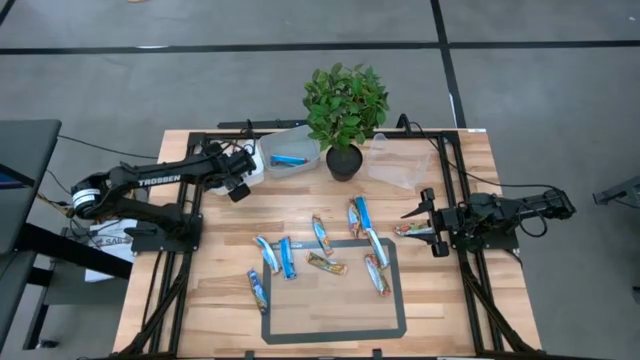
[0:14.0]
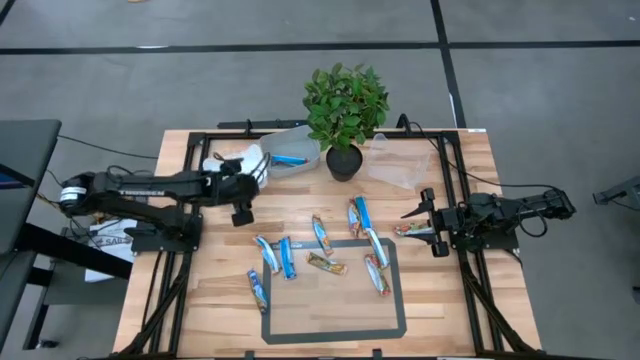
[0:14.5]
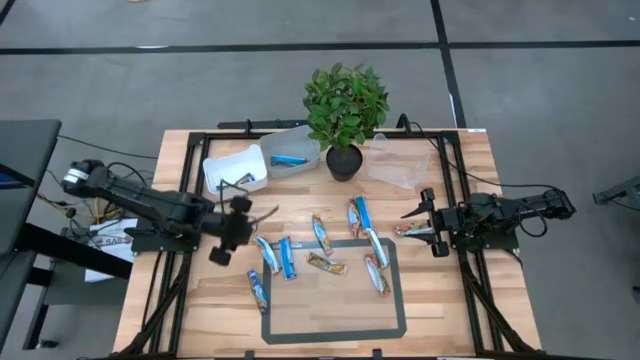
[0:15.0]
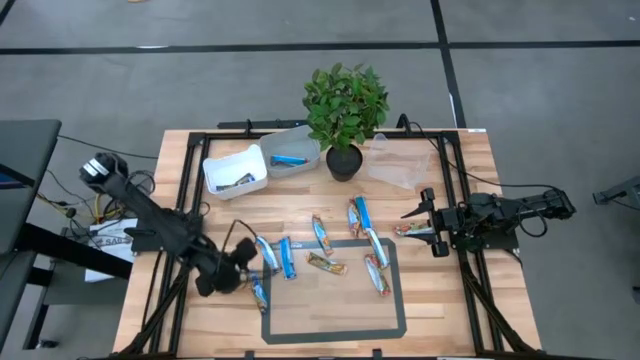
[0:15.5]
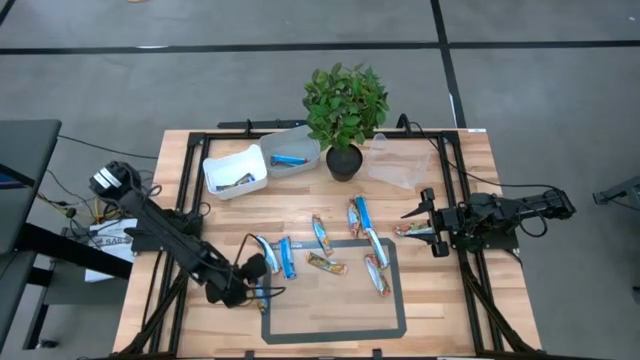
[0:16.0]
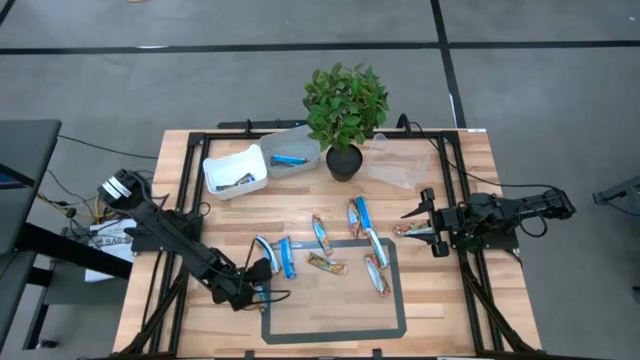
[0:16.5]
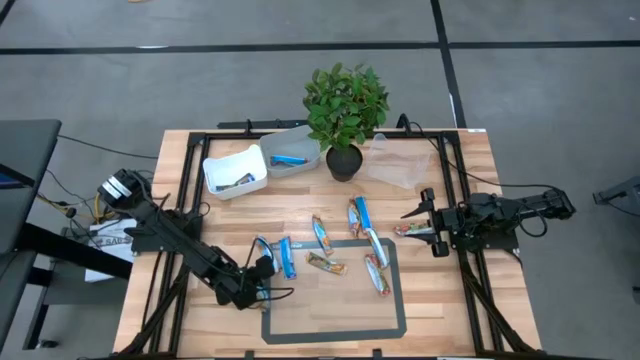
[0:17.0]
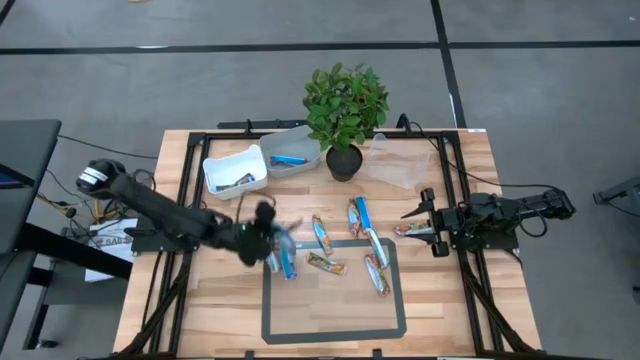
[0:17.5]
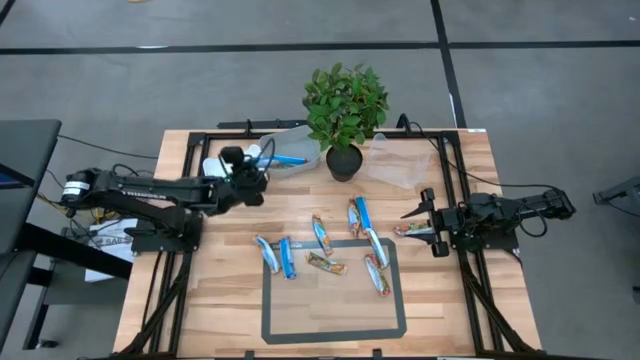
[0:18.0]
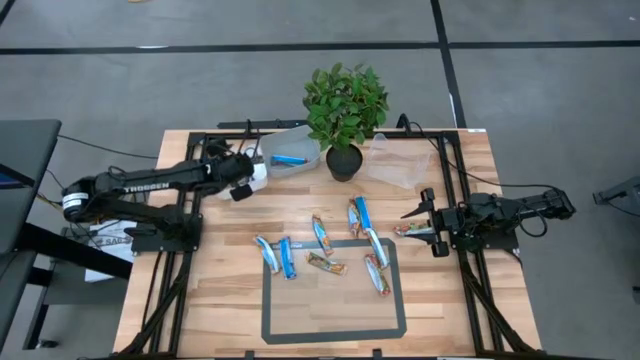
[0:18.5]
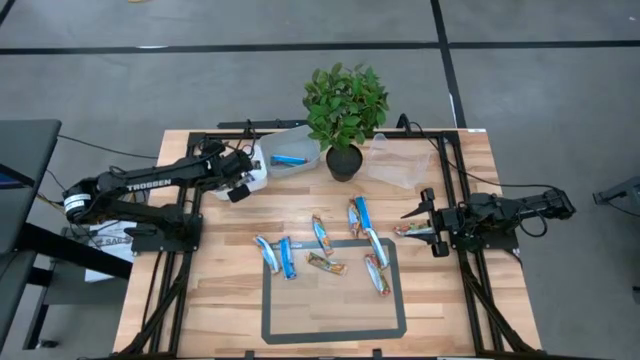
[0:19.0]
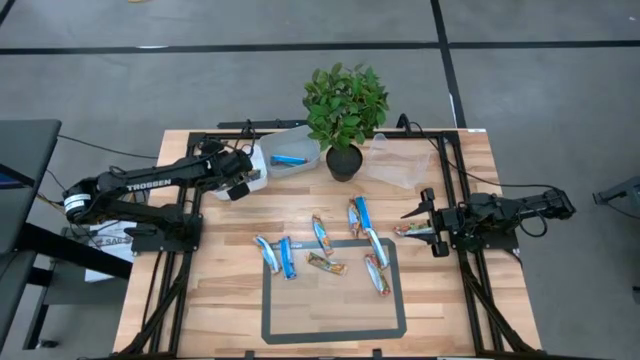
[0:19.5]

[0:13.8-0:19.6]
Task: Pick and place Granola Bars by type
Put the blue granola bar into the white bin

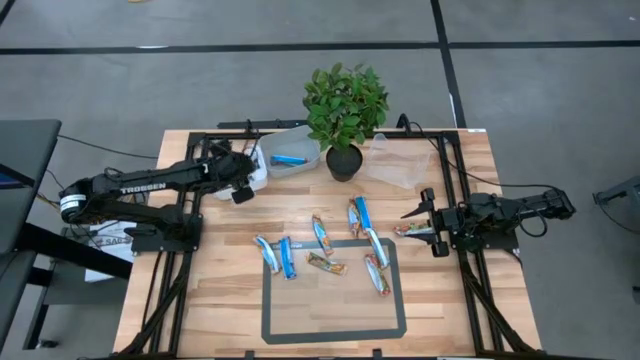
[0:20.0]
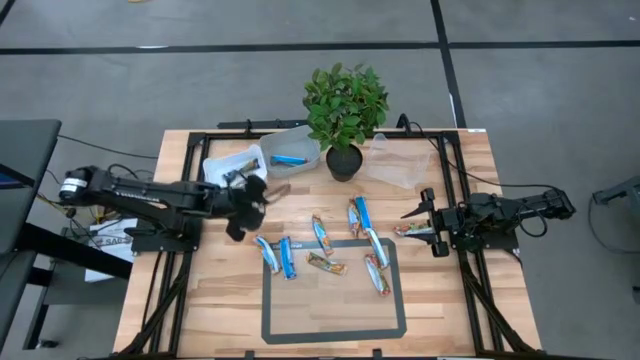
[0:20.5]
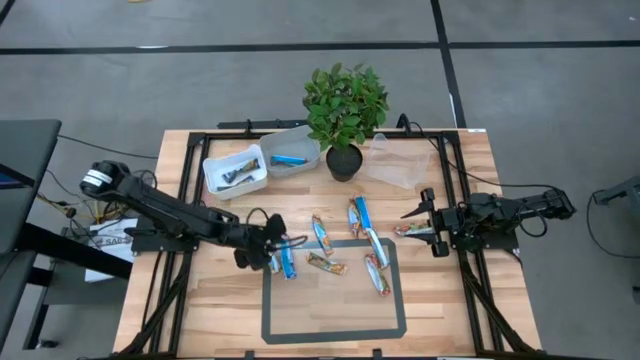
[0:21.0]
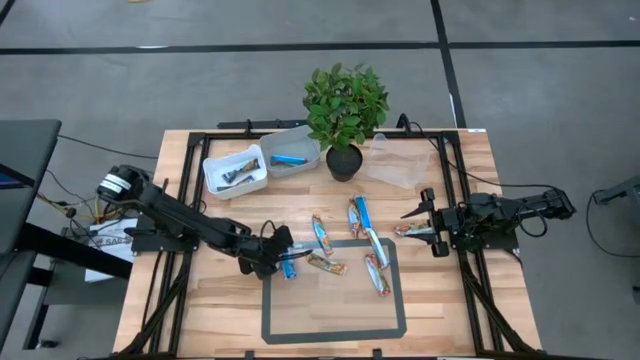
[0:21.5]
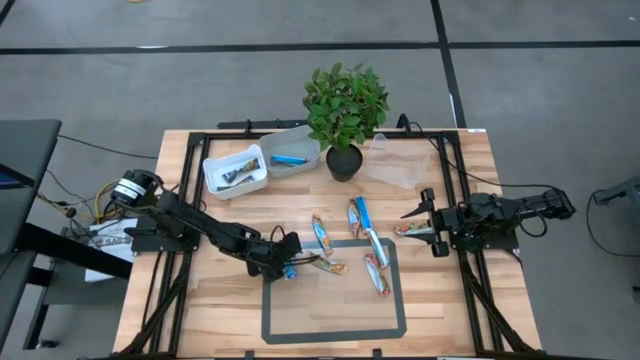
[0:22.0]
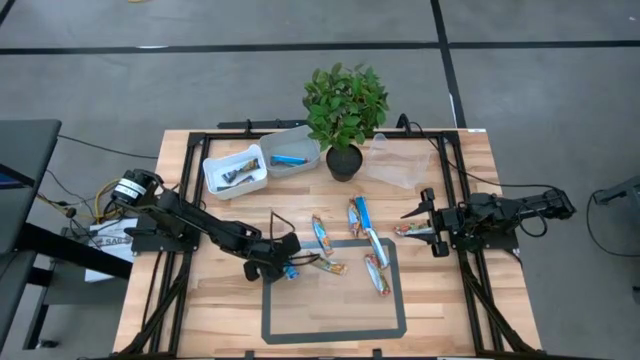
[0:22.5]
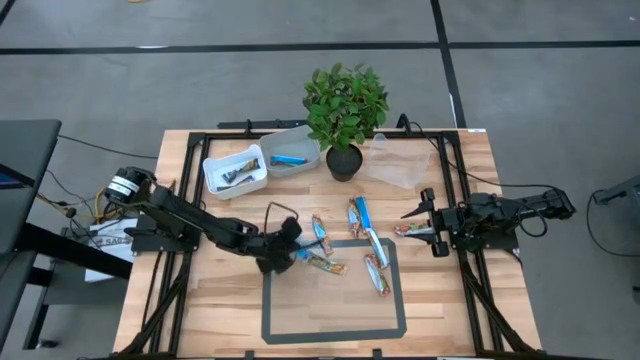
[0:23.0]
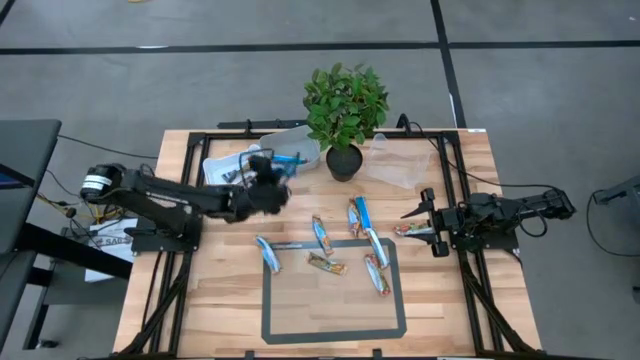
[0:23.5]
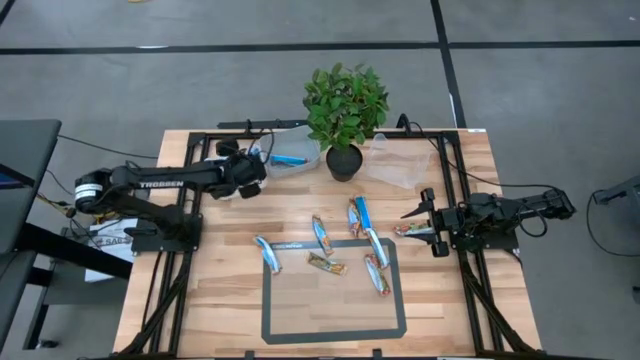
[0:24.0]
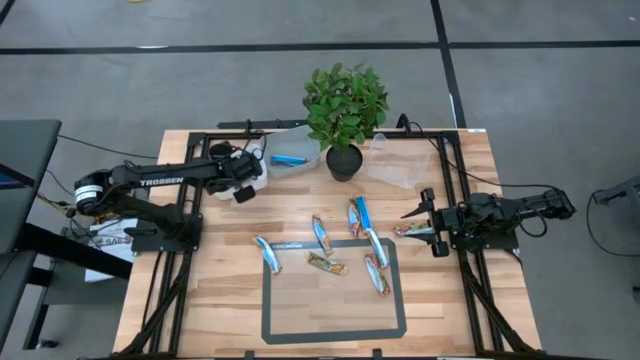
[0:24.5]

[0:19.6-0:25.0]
Put the blue granola bar into the white bin

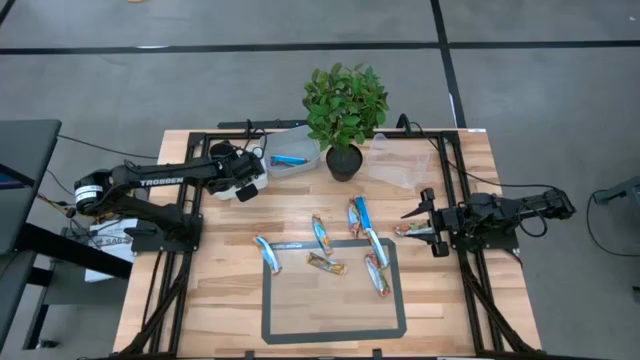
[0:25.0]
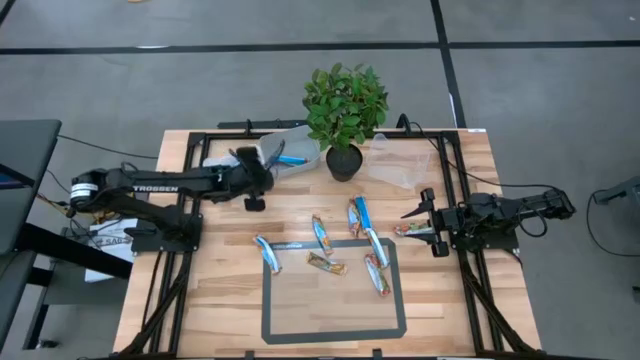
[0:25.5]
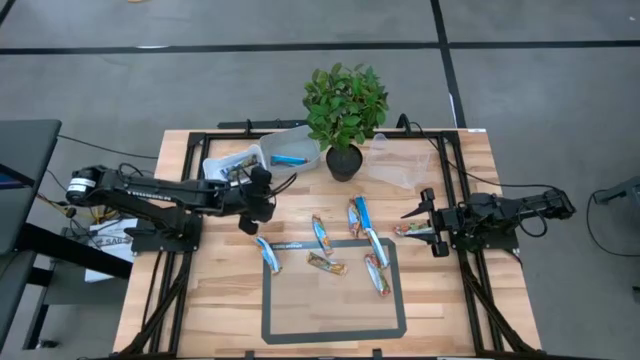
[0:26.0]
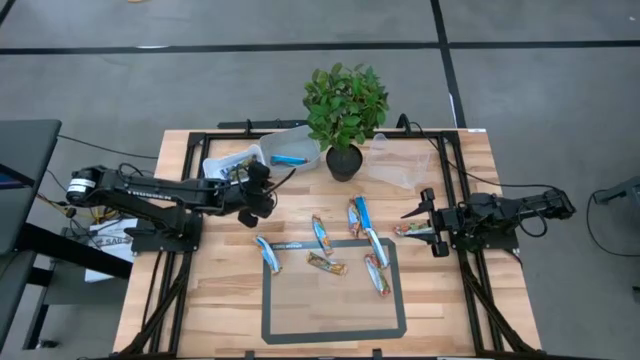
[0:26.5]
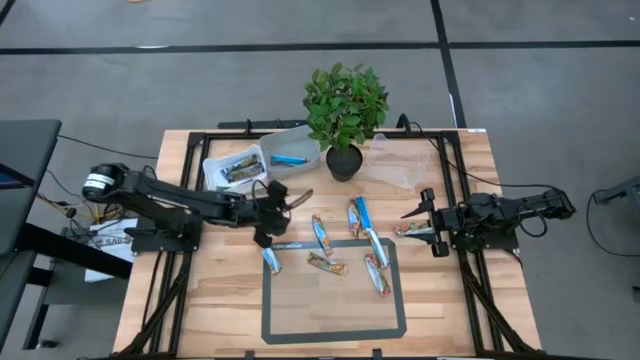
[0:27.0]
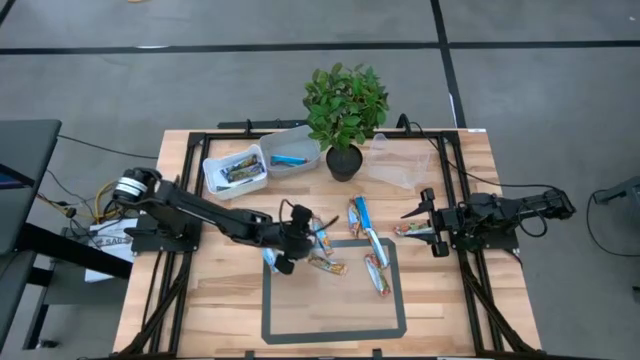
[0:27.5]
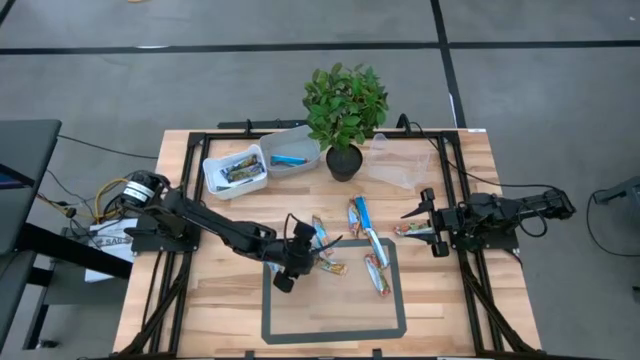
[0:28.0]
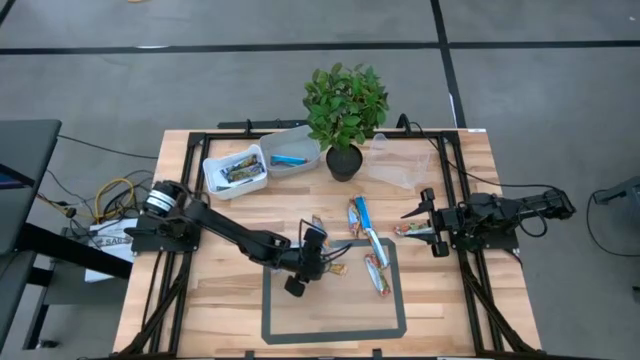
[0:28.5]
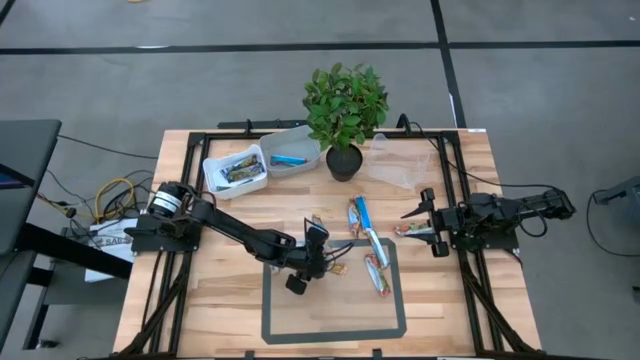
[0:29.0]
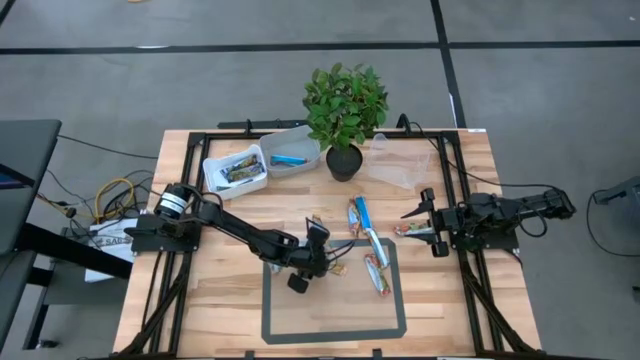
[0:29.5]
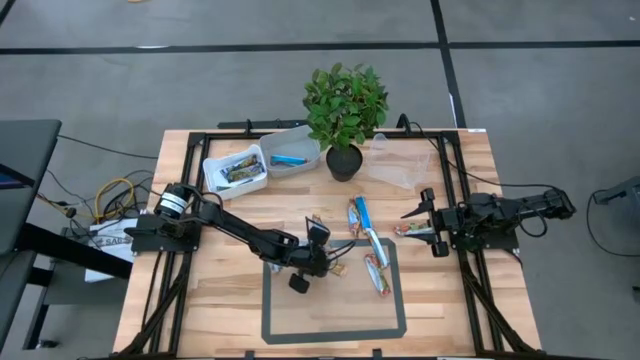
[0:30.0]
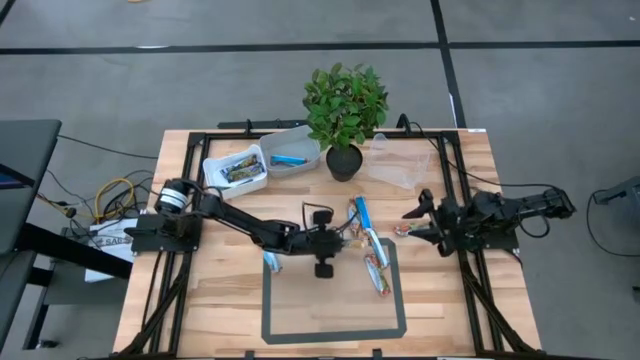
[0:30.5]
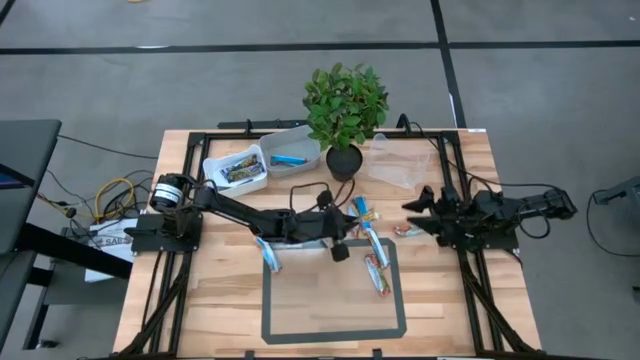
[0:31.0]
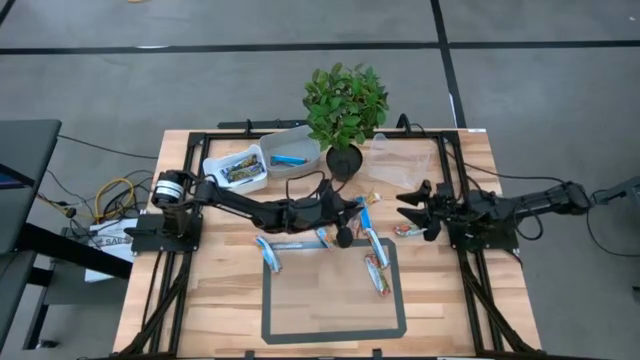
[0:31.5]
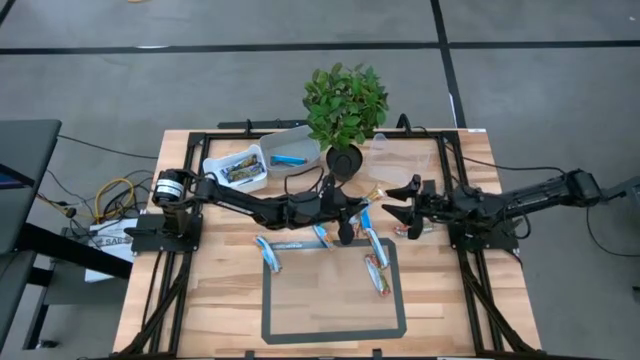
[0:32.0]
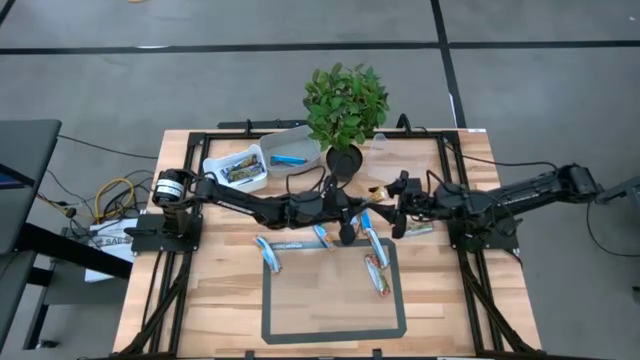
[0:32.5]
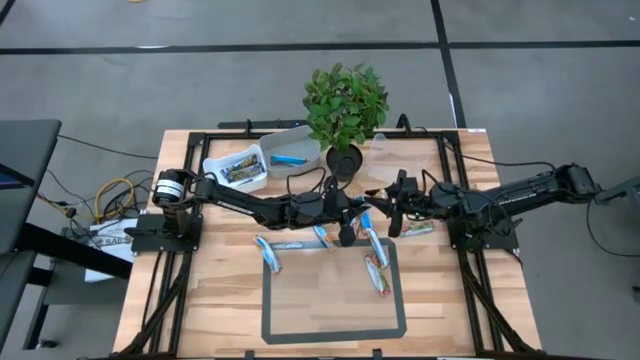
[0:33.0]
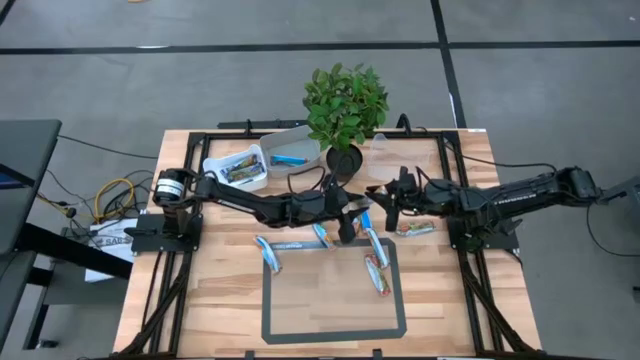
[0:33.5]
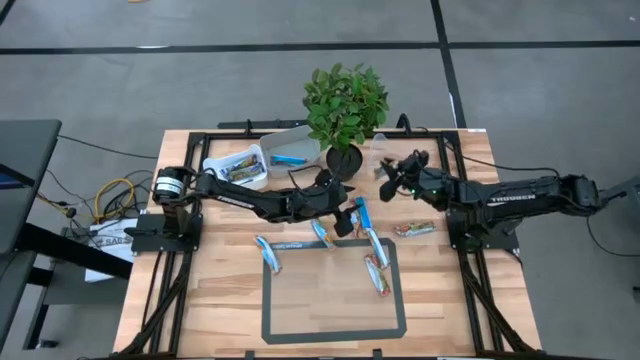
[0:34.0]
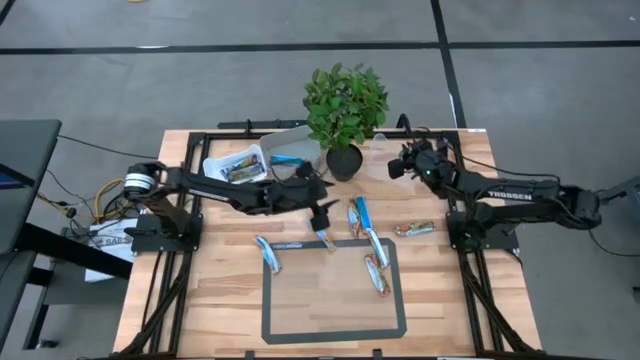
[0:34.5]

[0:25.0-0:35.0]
Put the yellow granola bar into the transparent bin
